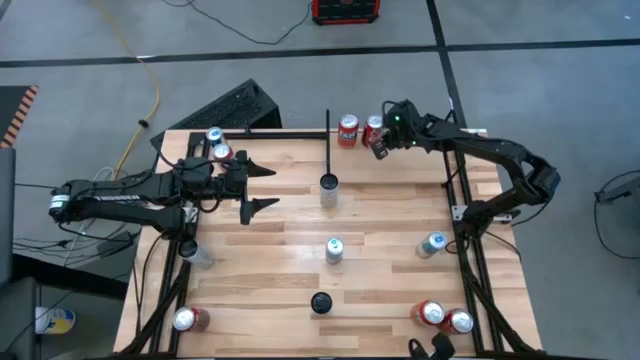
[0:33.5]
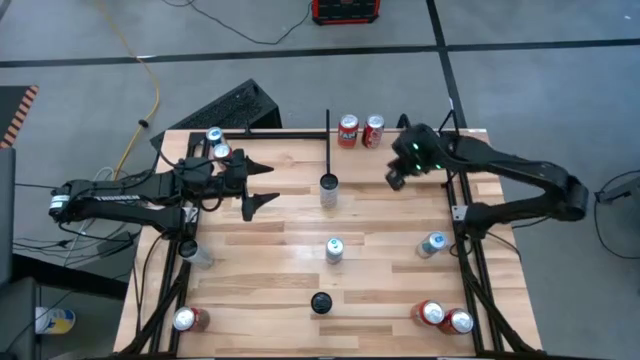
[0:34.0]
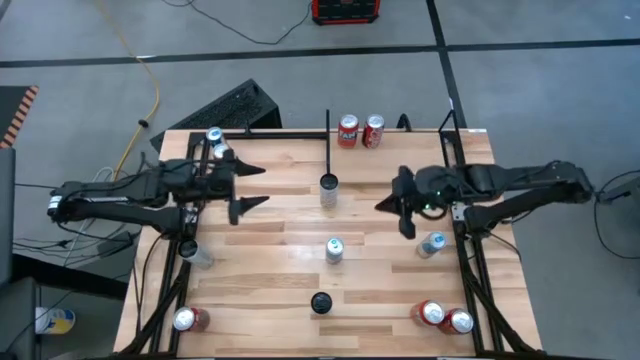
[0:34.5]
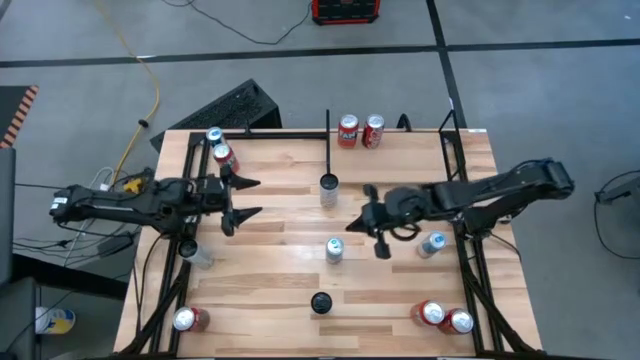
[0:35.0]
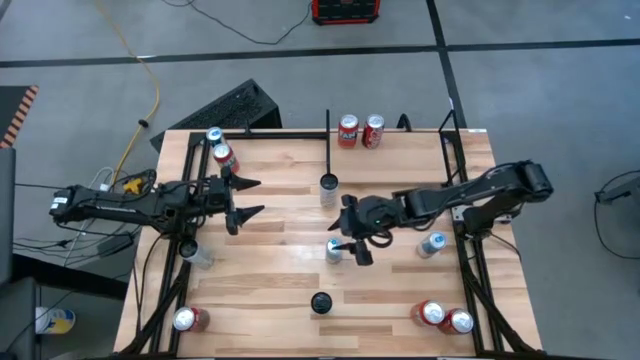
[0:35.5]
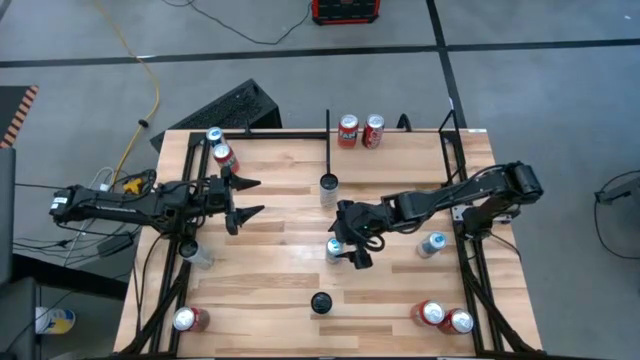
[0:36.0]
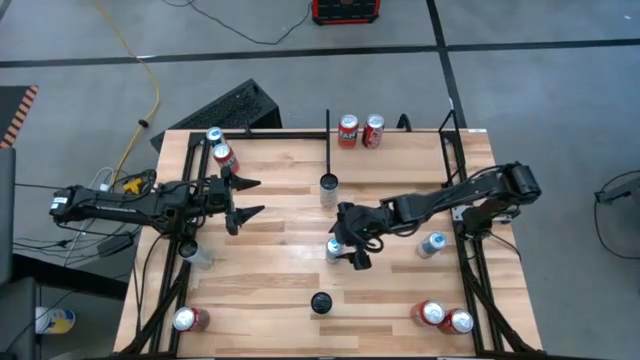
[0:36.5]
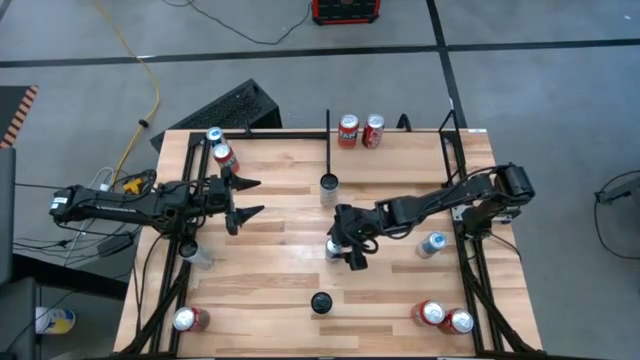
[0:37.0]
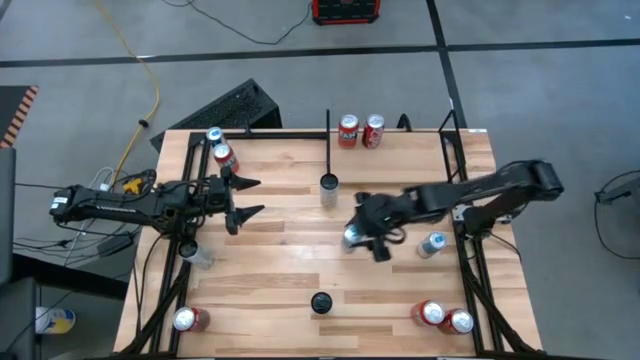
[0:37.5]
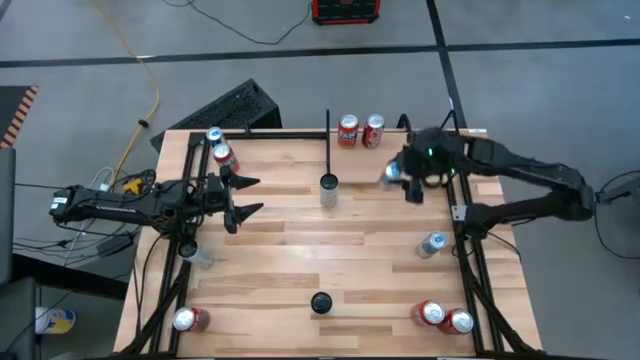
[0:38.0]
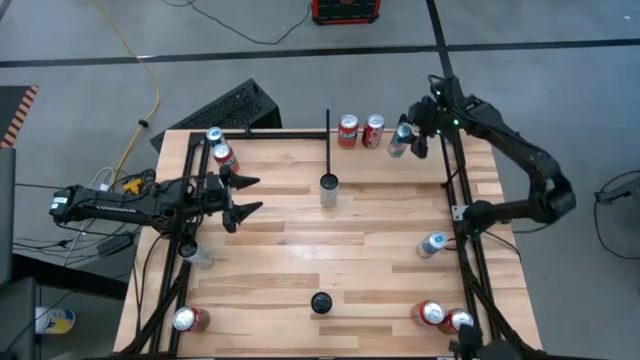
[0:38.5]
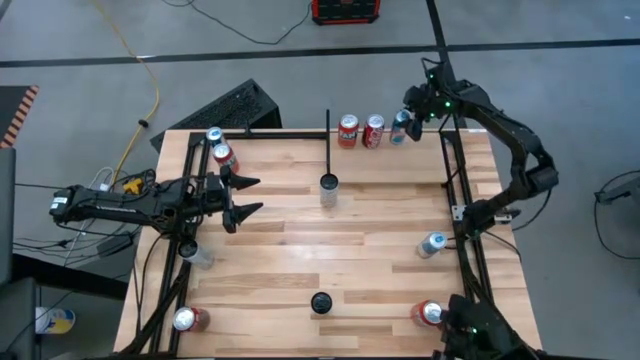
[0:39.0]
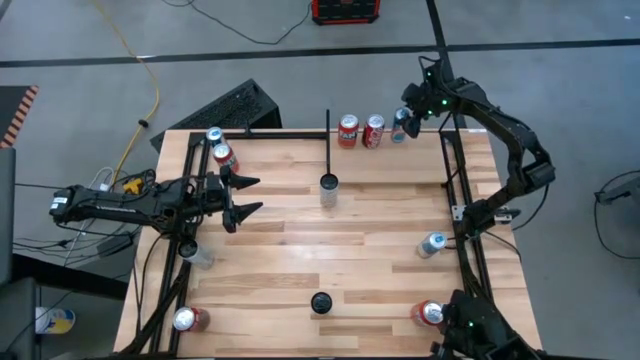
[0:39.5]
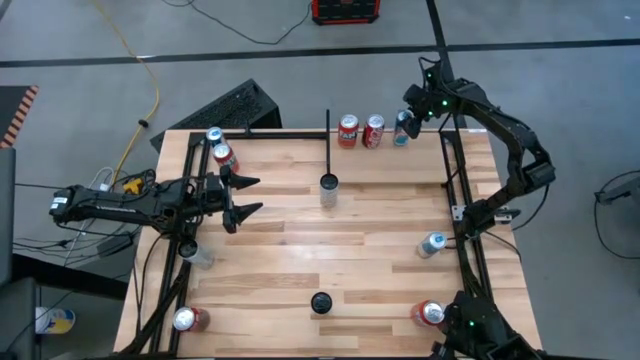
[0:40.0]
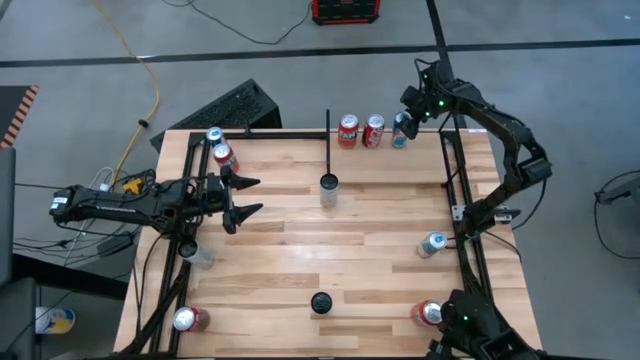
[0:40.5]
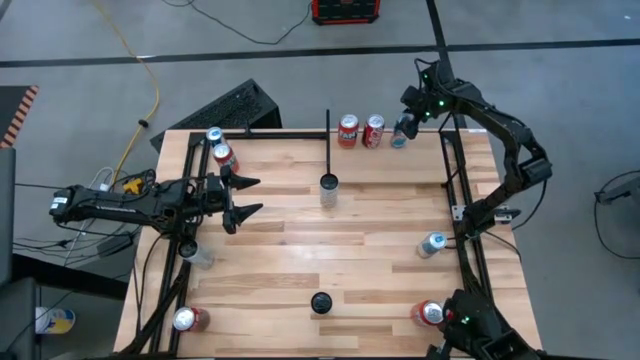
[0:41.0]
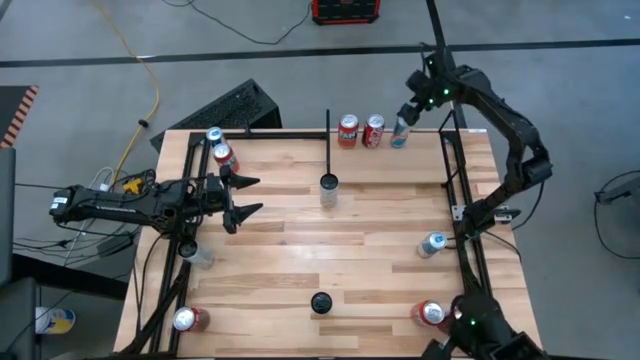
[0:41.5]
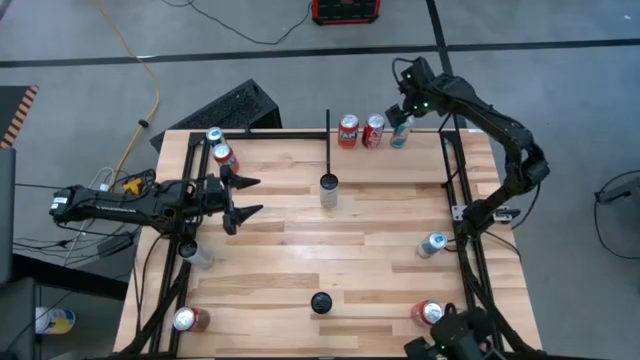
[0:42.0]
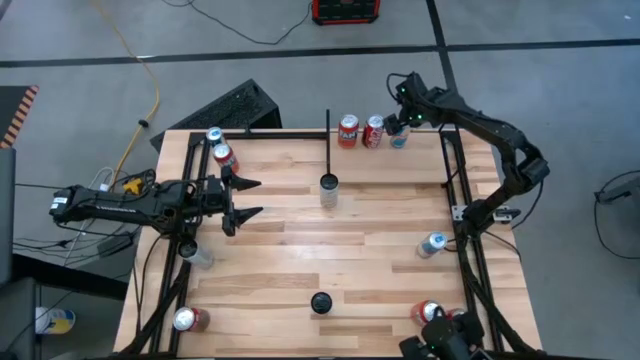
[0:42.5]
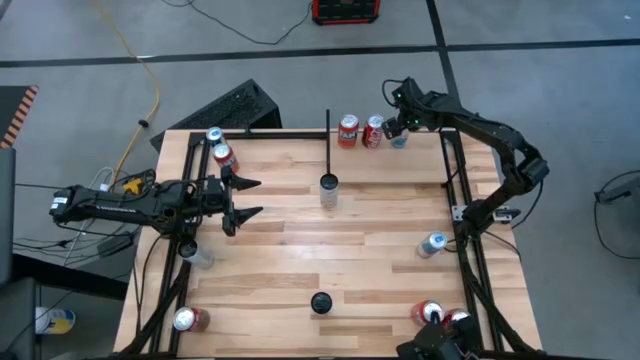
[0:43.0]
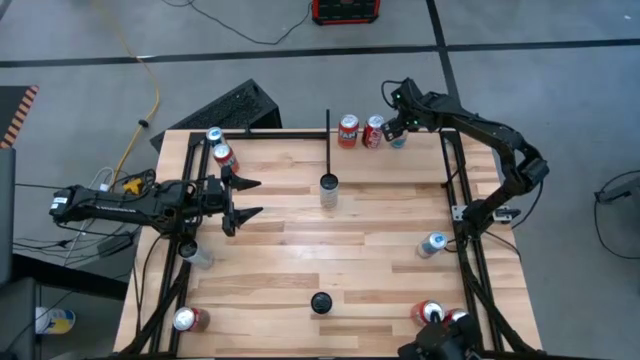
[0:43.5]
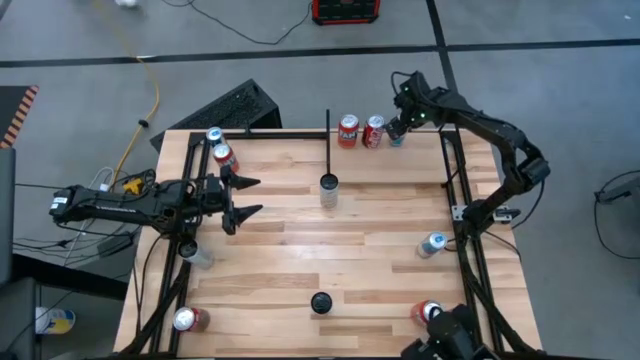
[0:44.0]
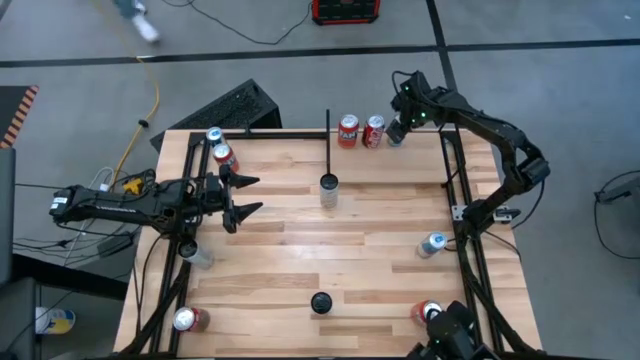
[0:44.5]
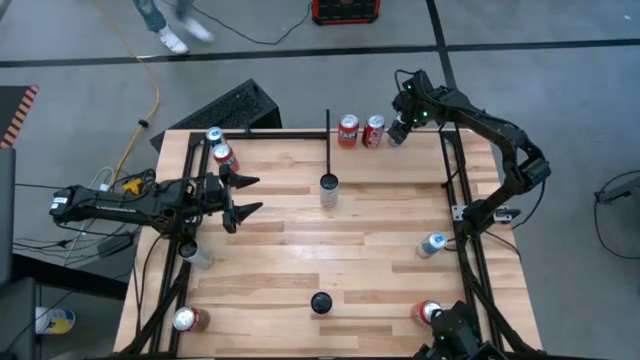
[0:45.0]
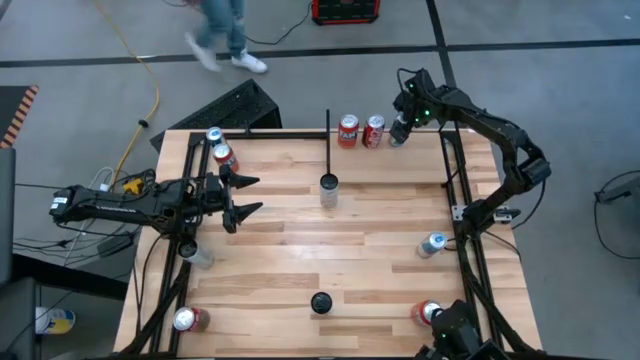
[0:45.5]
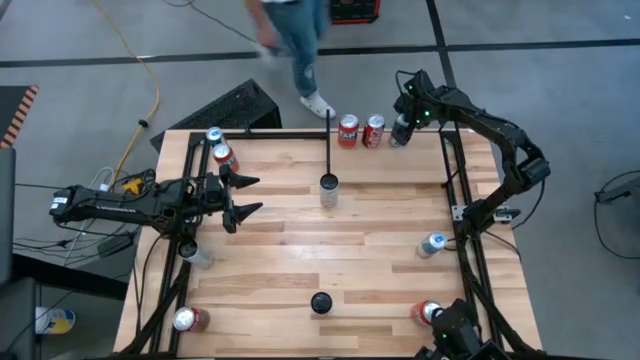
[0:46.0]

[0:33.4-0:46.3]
Task: Place canned beverage on shelf
Put the bottom left blue soda can on the shelf

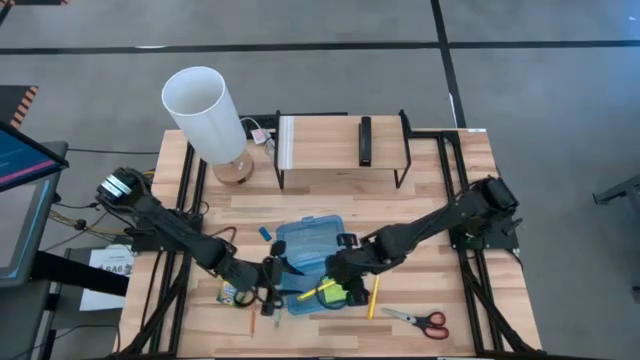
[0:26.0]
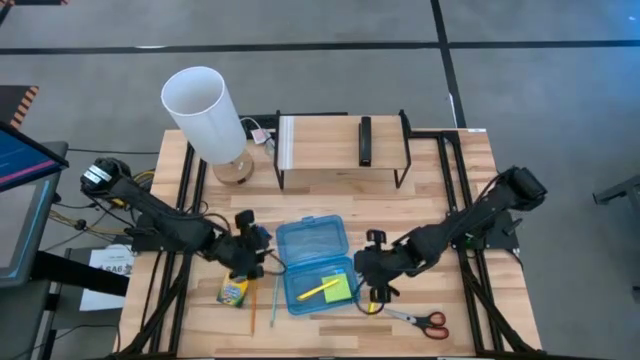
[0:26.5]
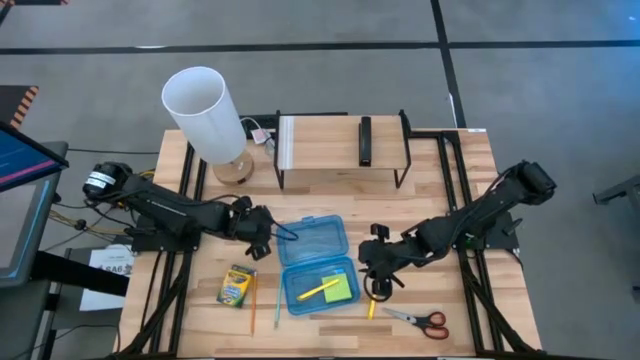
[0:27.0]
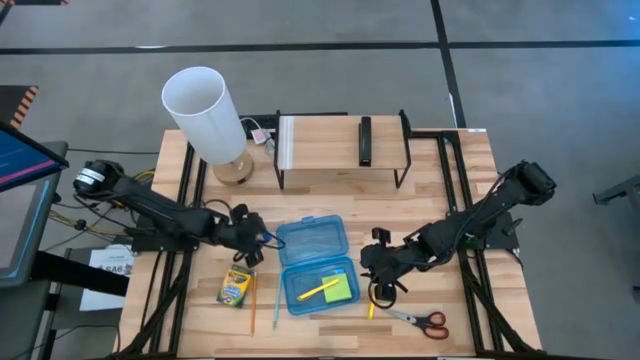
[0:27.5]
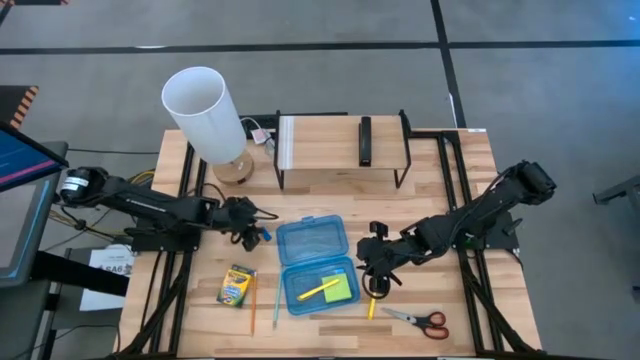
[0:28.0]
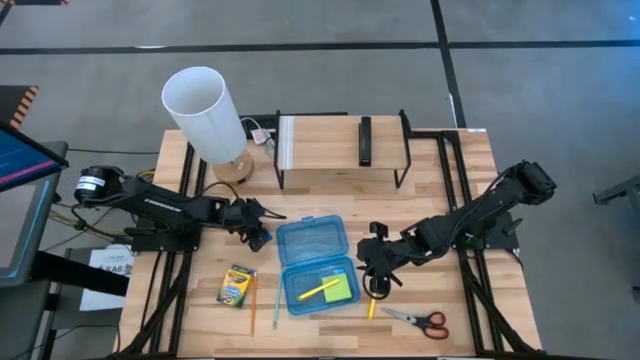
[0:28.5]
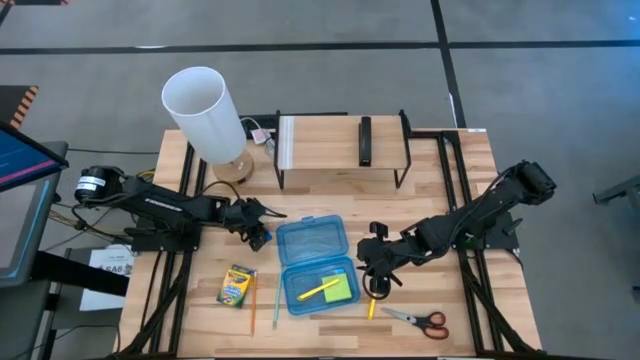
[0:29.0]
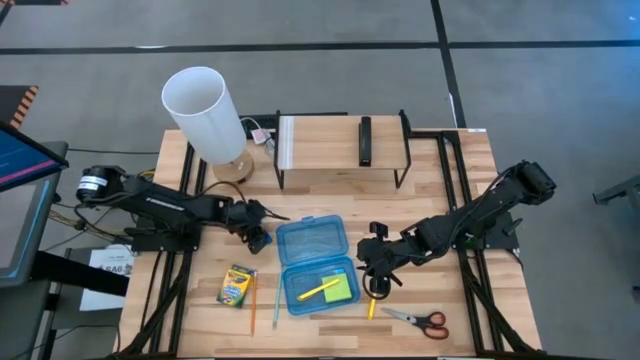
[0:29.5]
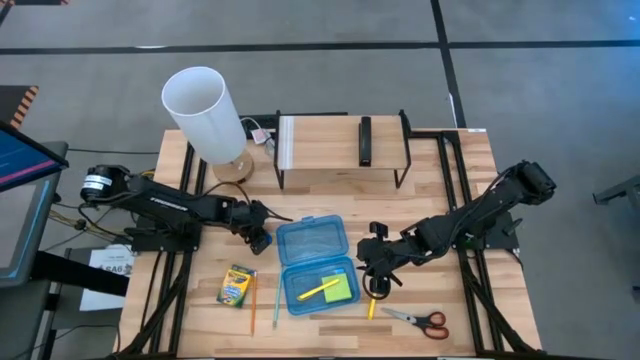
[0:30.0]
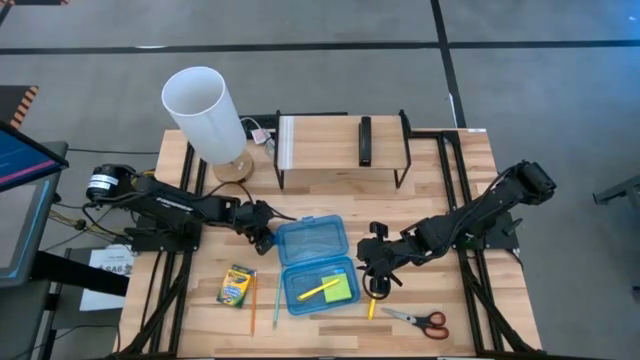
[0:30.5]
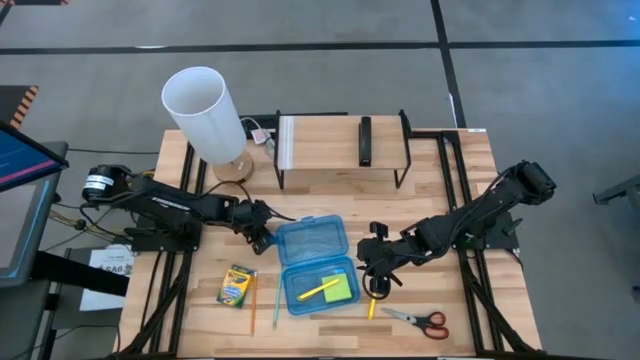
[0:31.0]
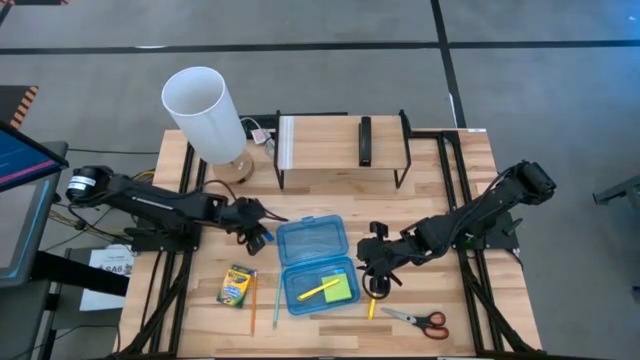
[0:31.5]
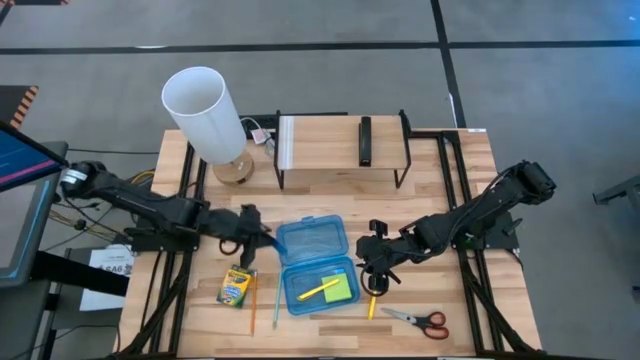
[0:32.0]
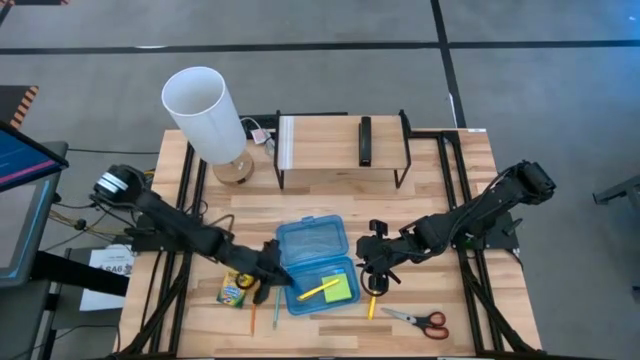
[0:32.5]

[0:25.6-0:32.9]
Task: Pack school essentials
Put the blue eraser into the blue supply box
